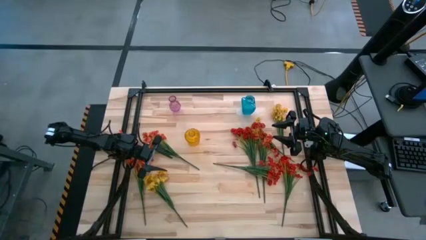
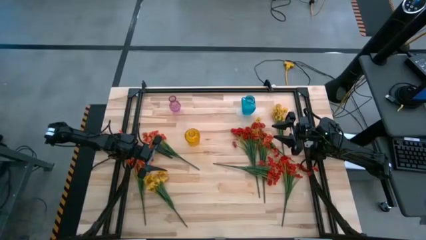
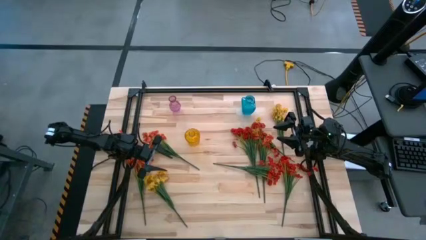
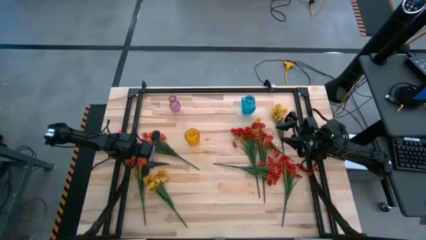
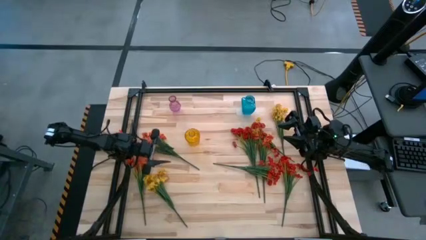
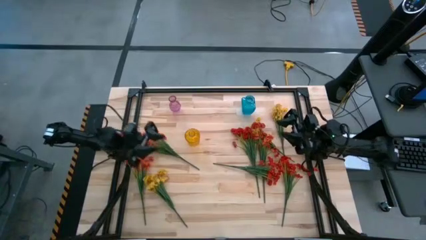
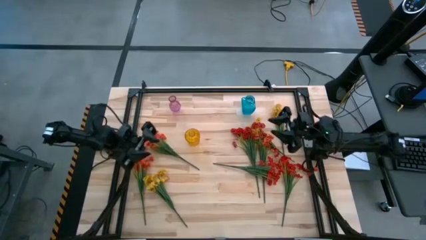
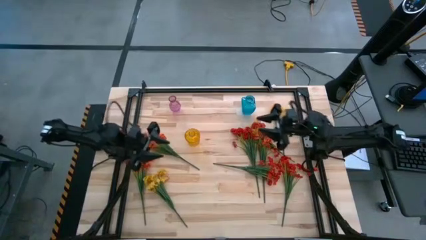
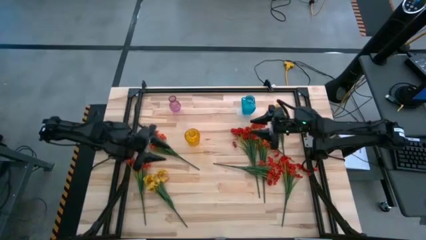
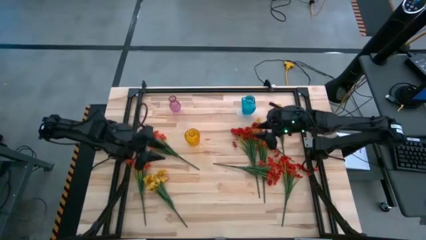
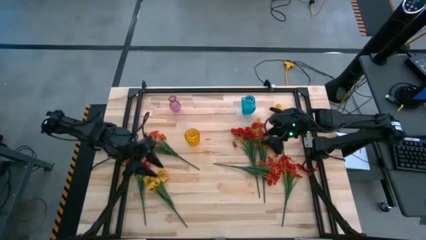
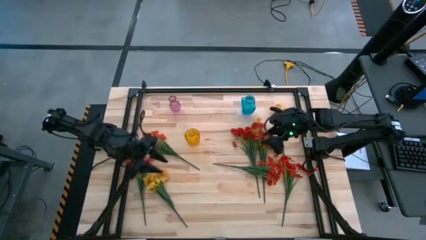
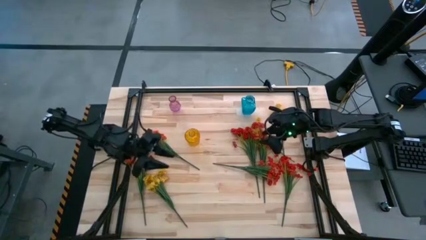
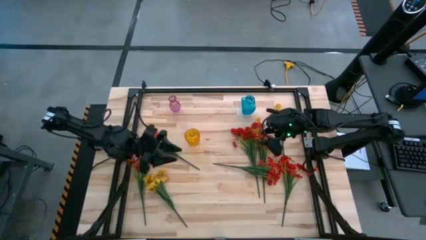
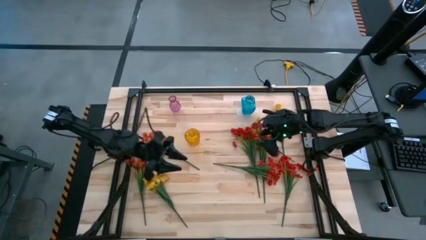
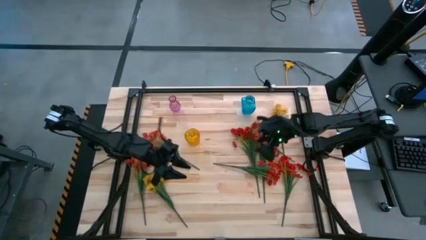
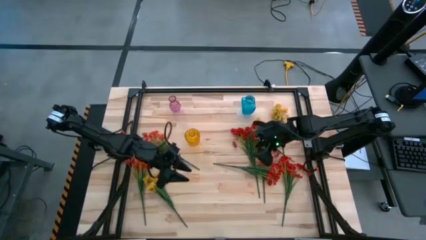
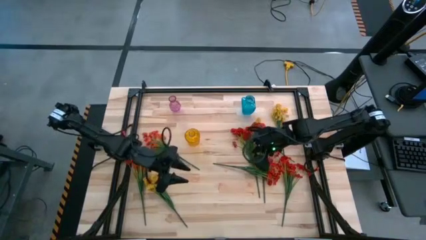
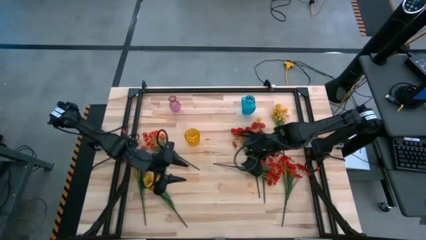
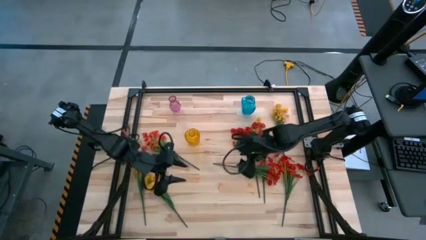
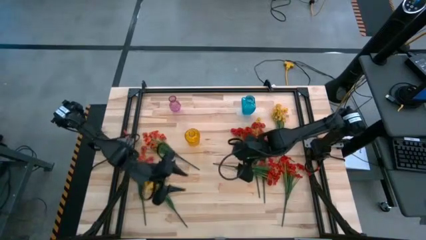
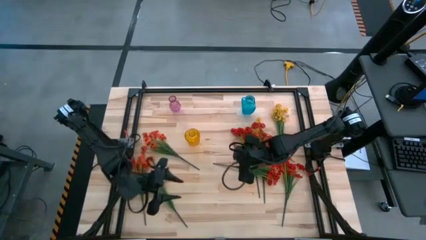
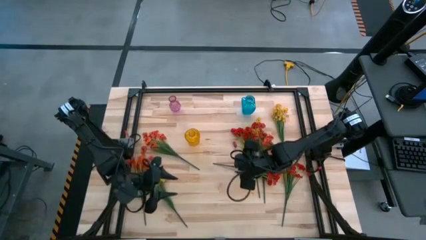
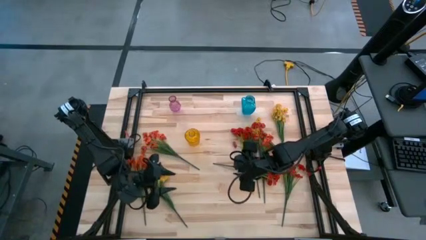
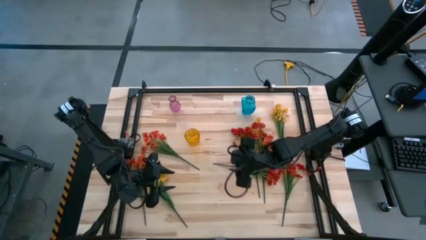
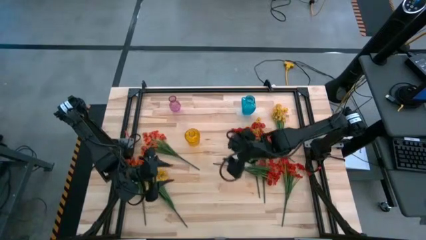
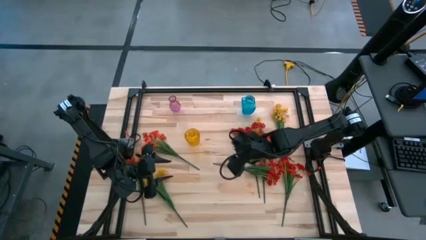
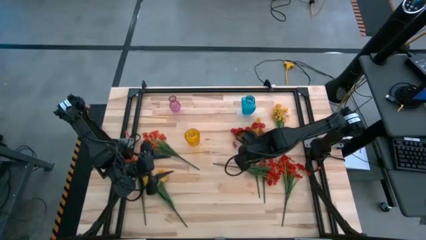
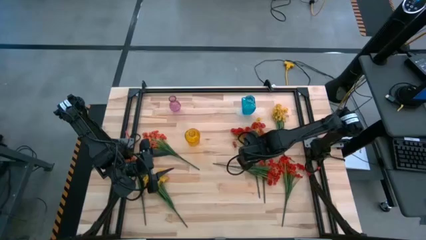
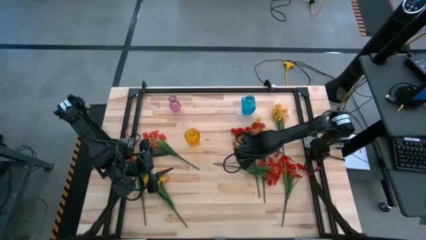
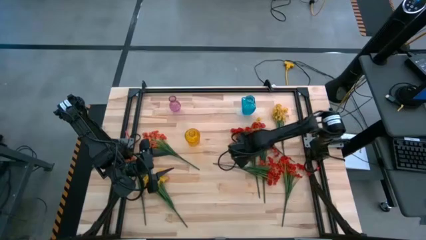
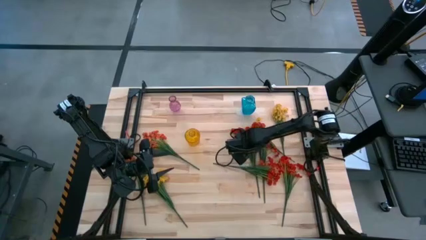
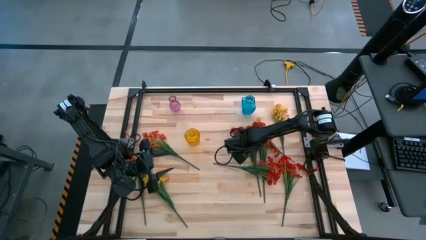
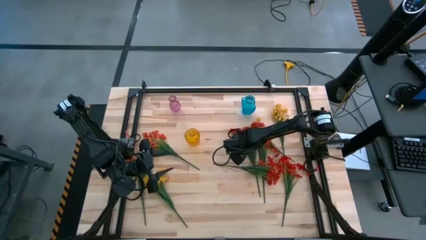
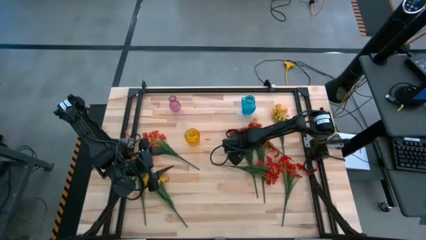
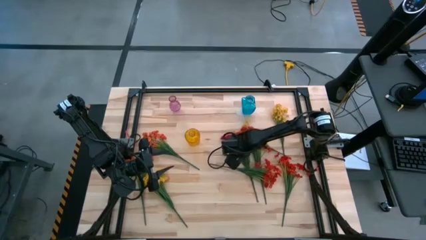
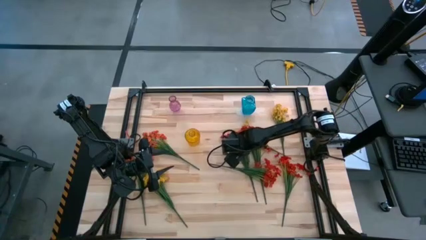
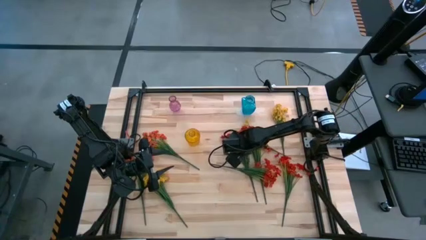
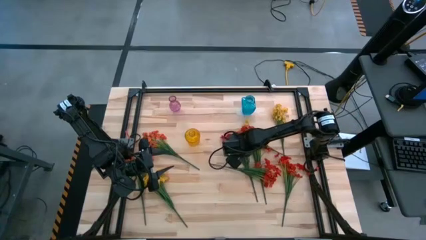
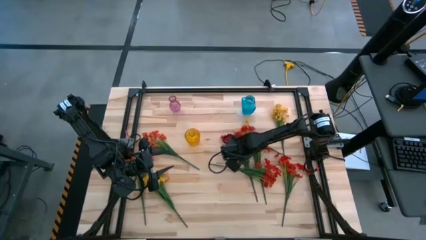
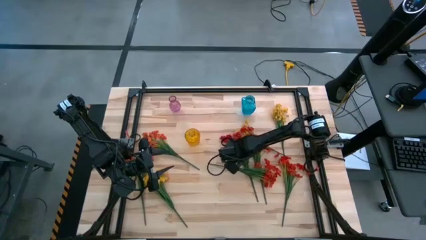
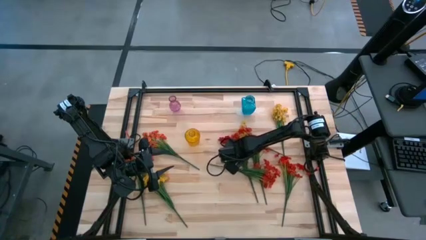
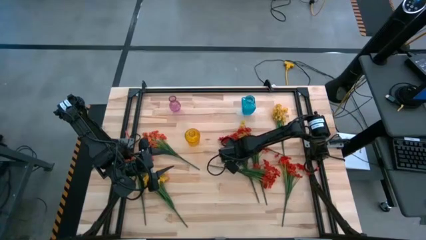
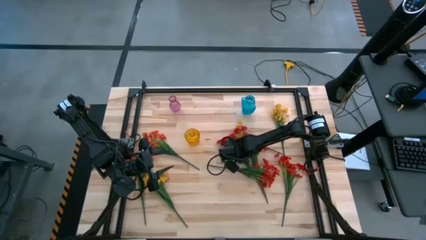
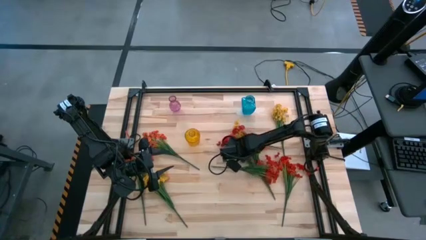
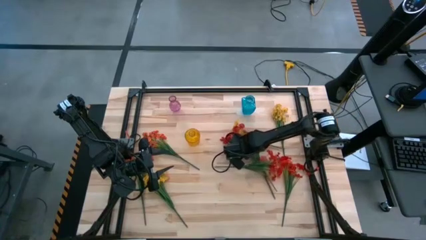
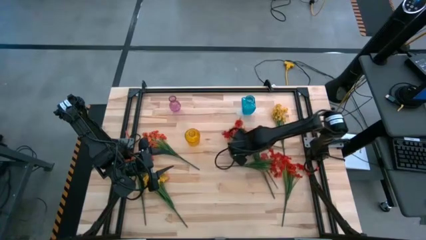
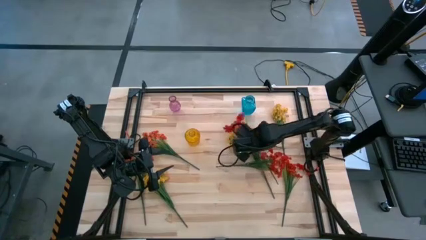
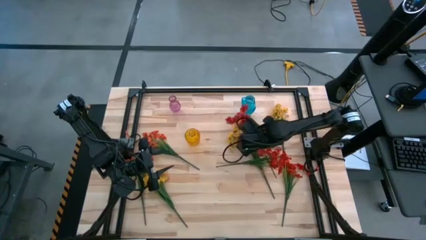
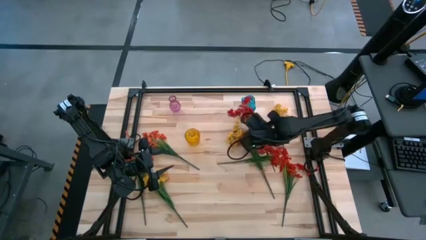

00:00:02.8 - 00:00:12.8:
Task: Sort flowers into vase by color
Put the left red flower into the yellow vase
